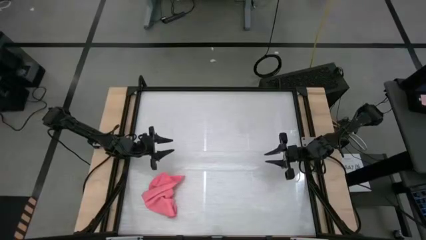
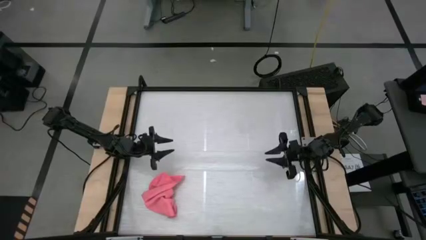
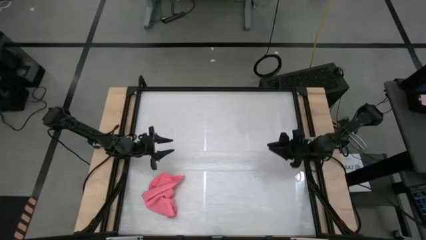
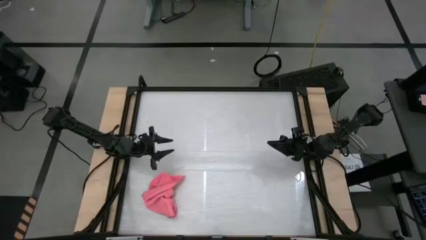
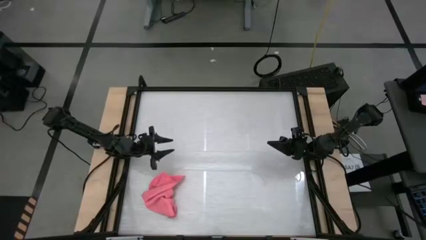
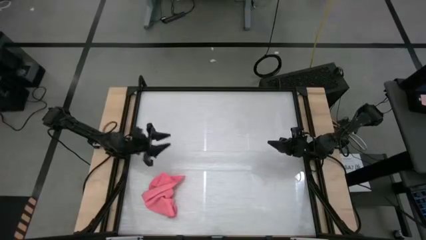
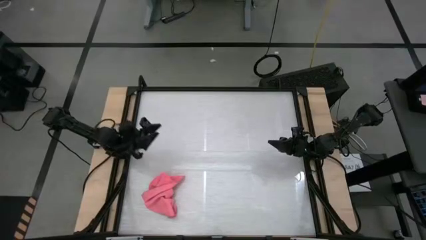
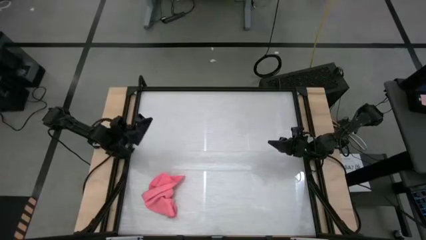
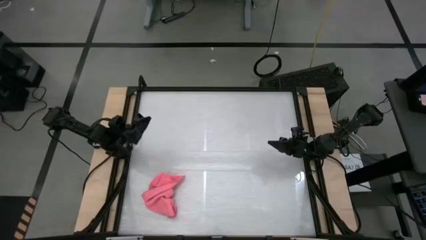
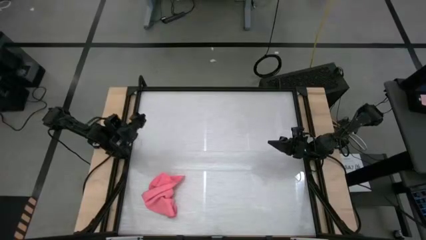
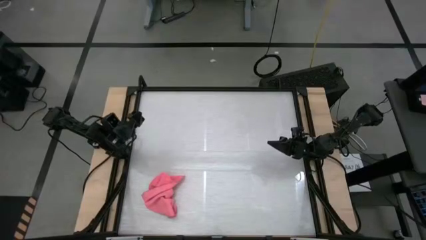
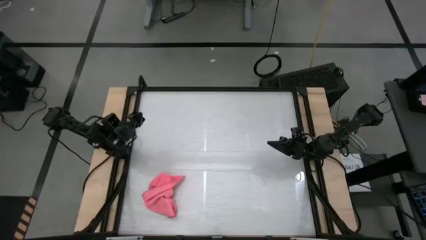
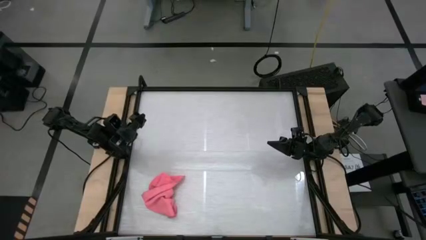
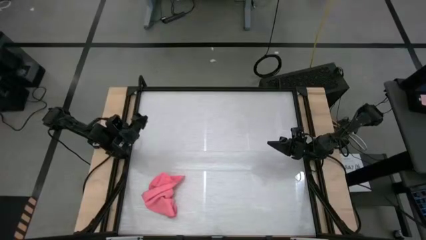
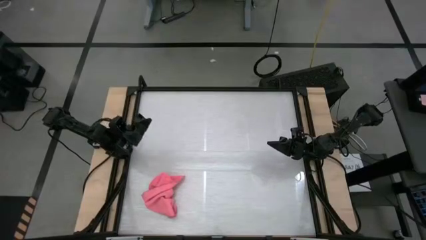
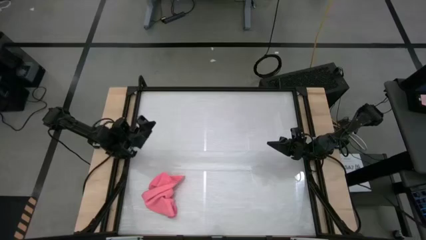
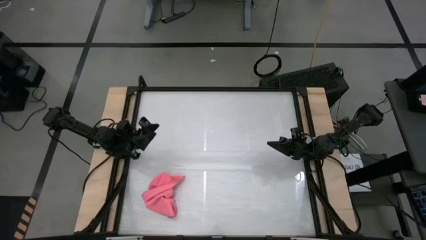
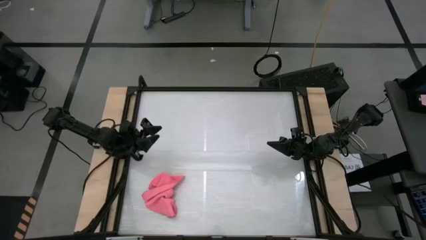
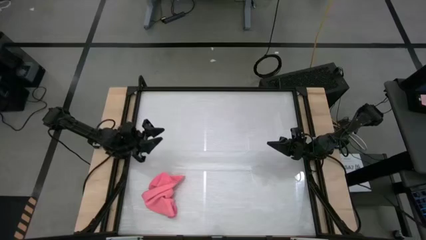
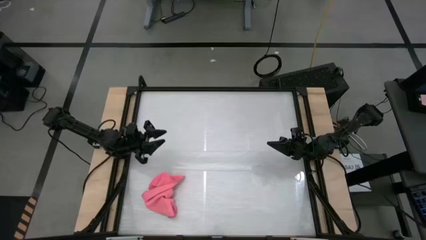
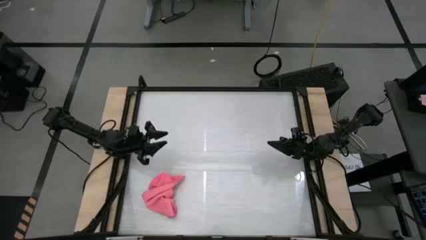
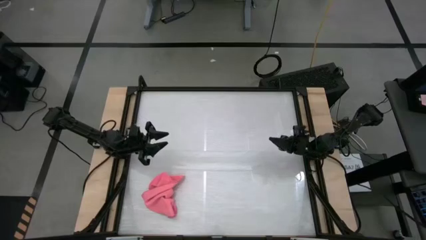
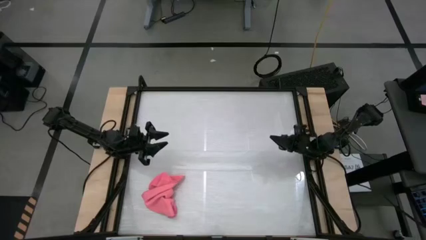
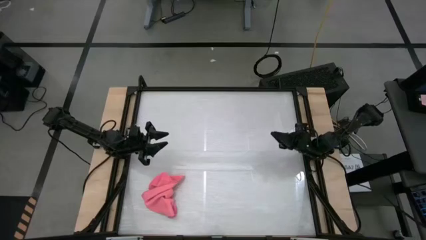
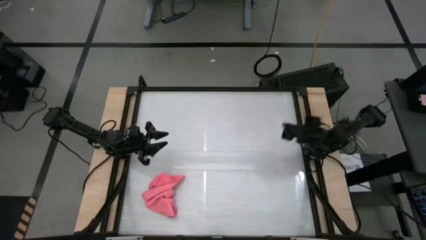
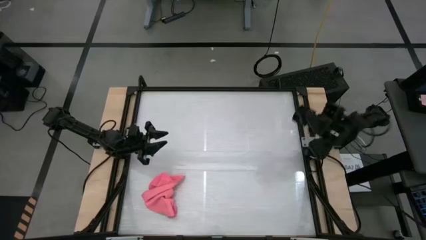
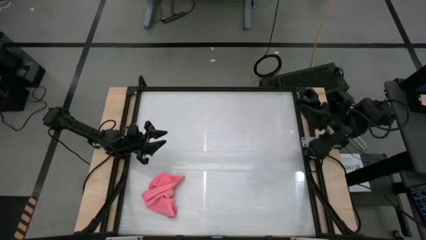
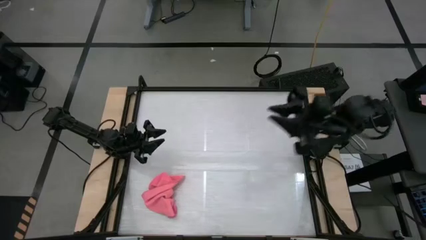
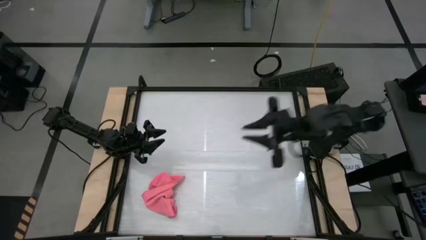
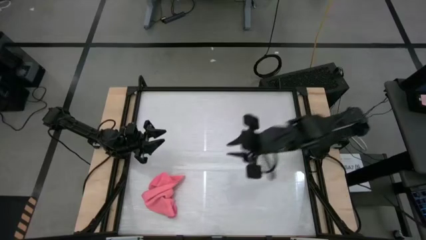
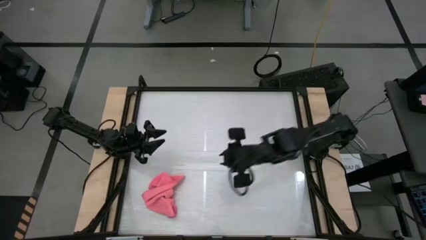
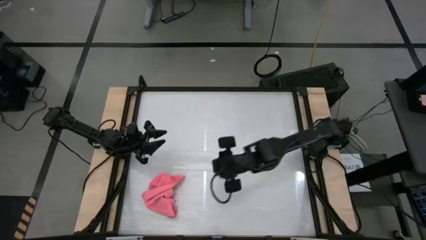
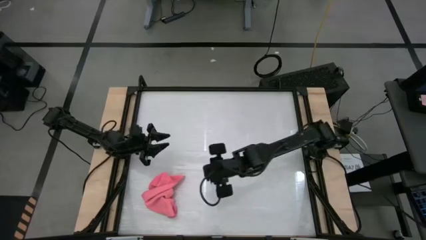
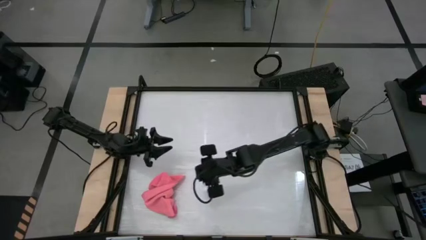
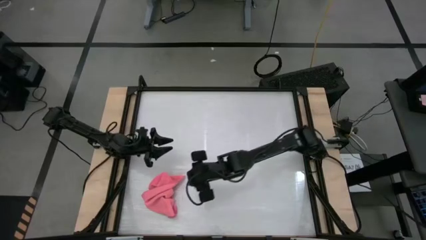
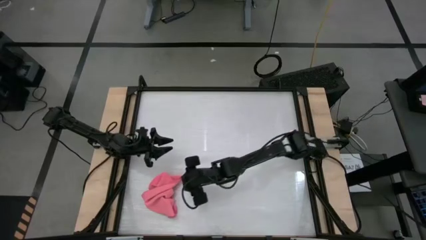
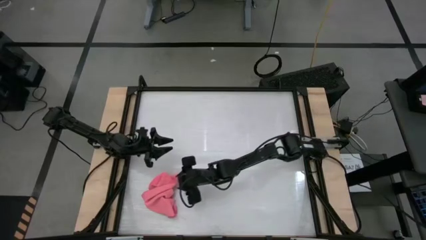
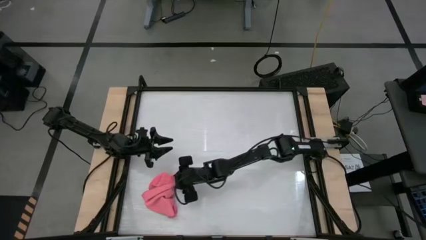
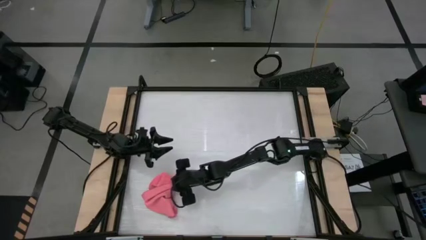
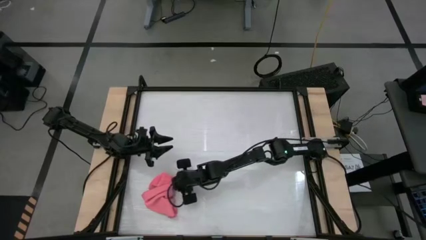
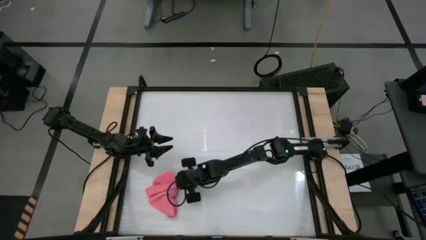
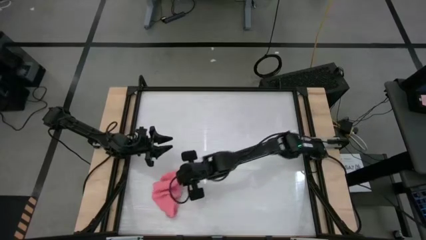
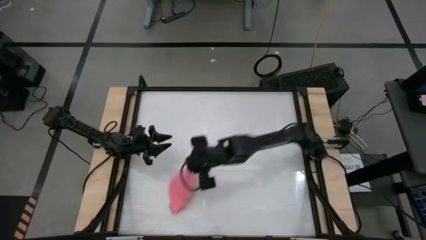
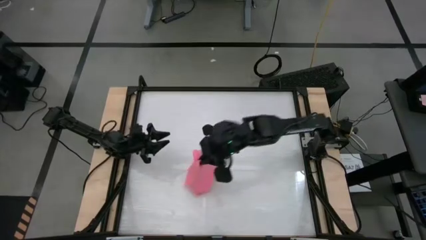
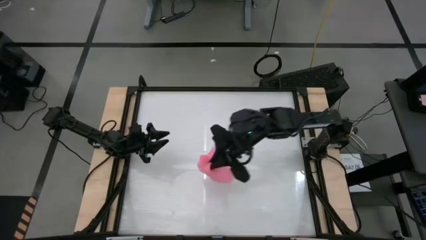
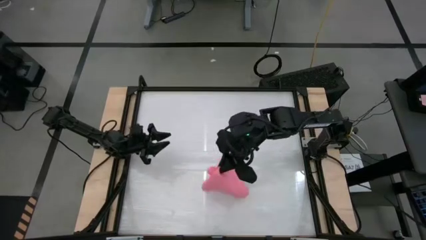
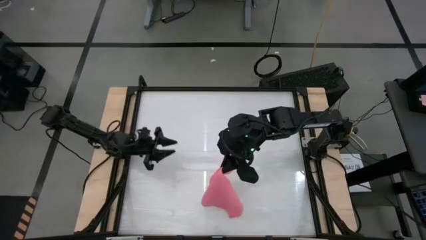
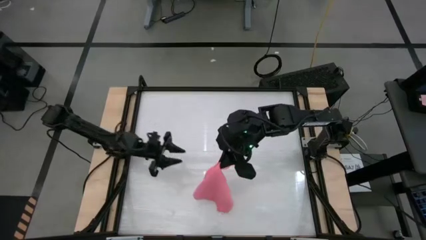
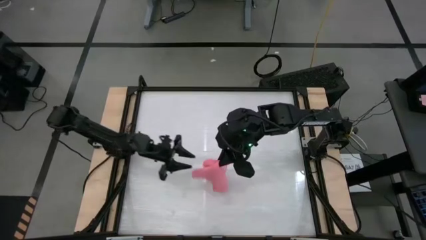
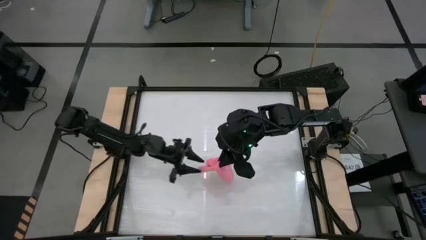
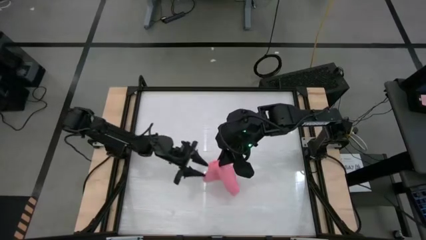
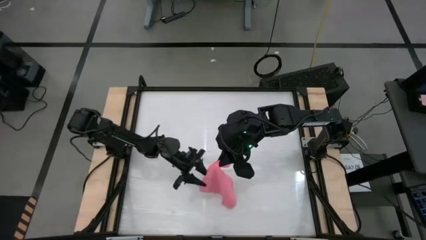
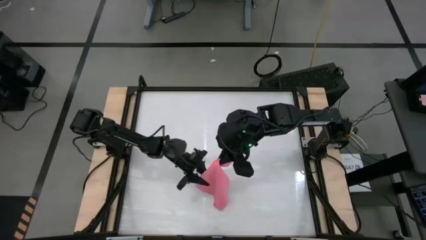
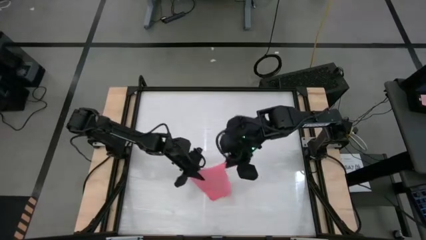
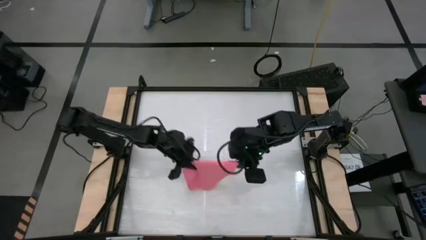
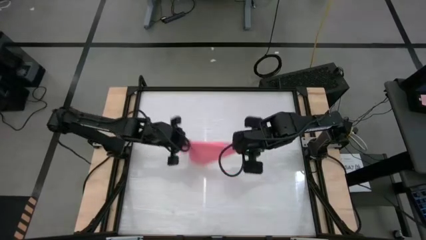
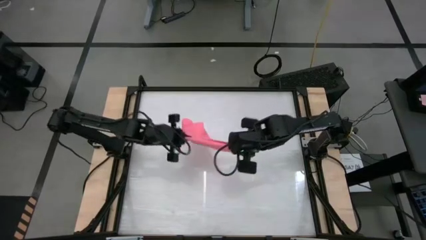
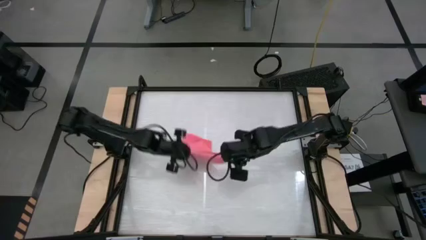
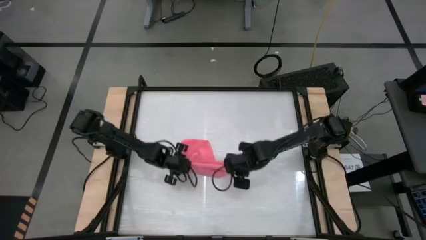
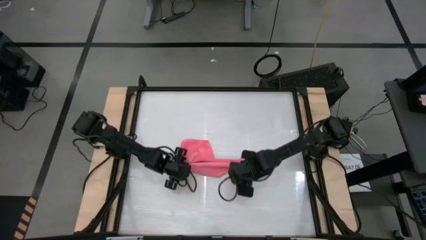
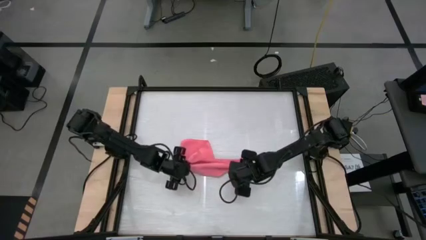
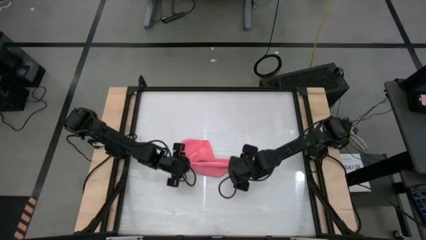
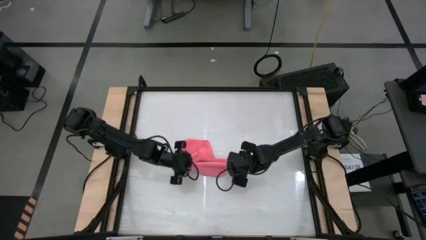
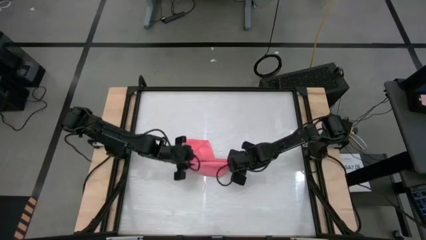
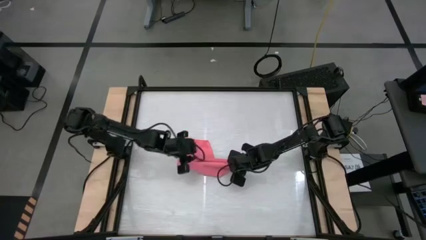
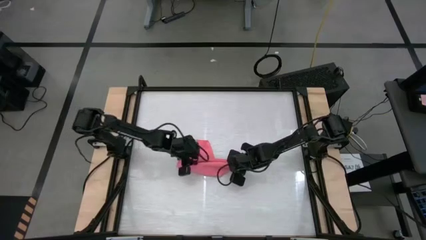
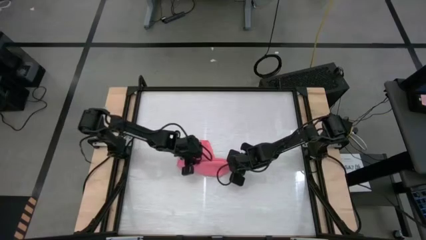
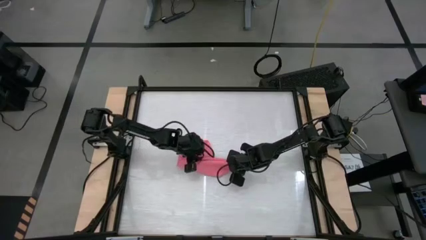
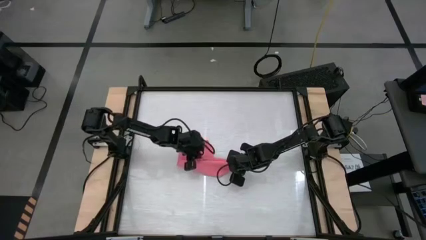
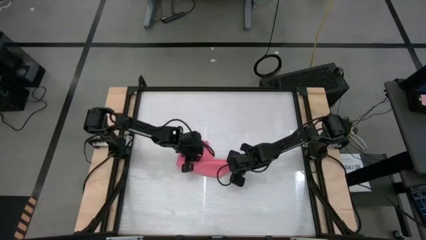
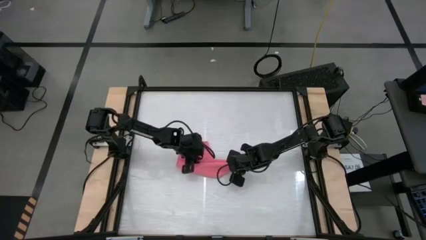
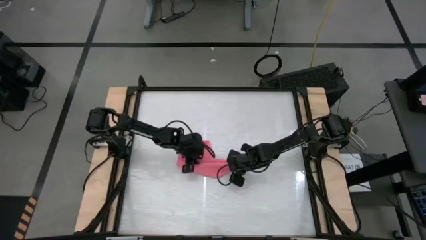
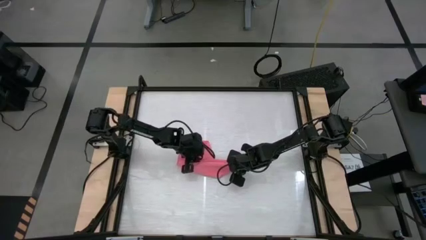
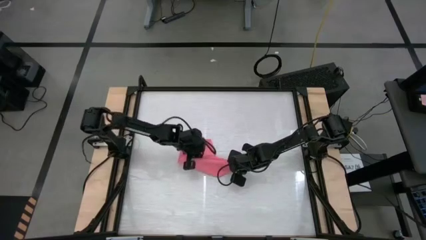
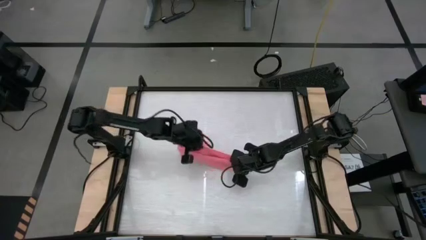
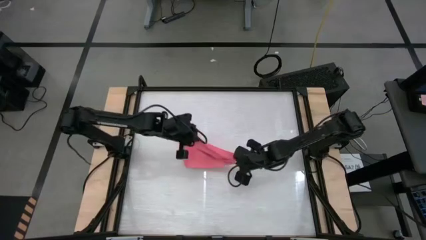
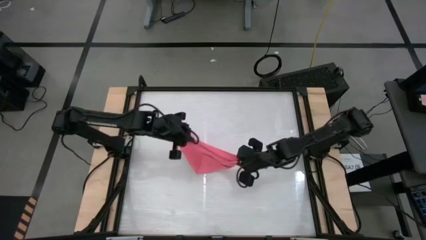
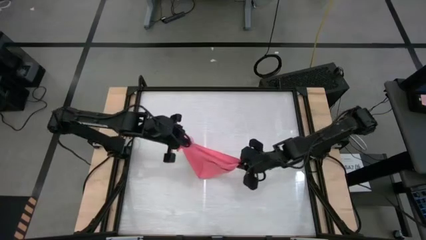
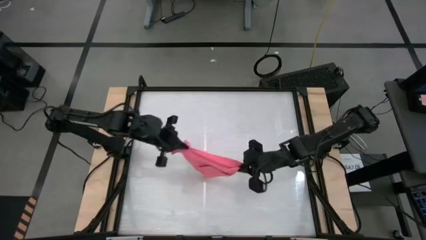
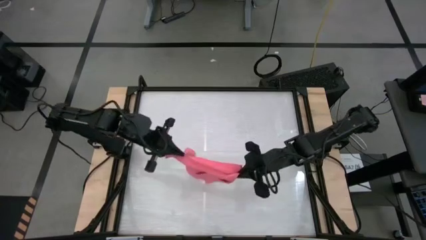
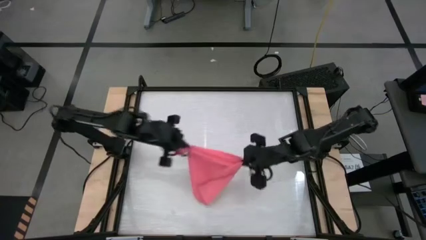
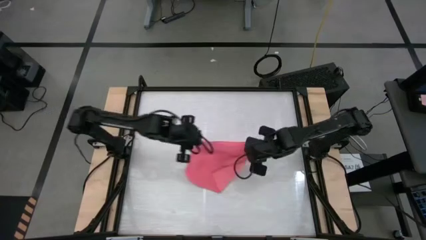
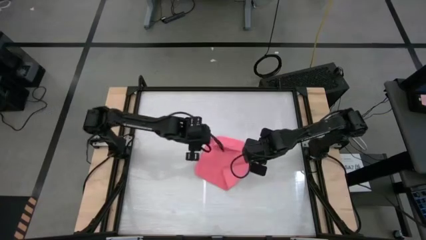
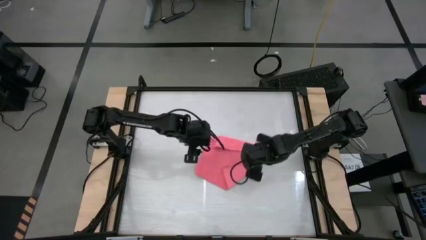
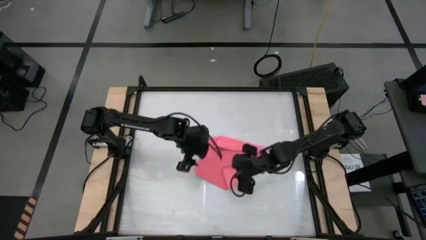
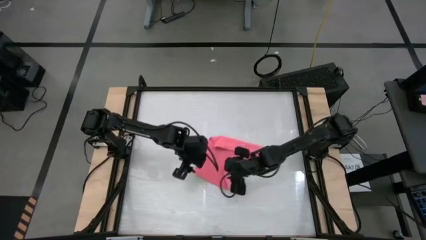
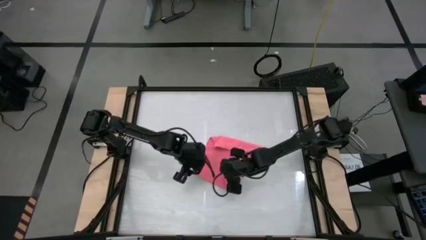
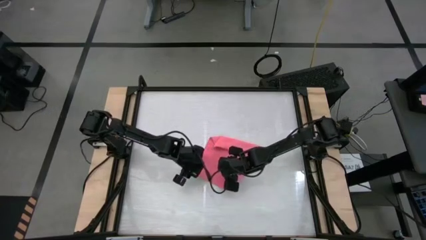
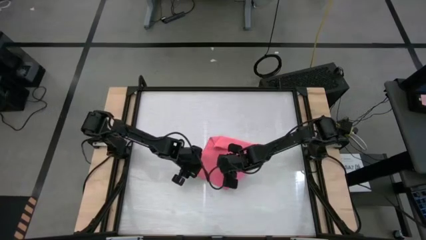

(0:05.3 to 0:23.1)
Task: Roll towel
Roll the pink microfiber cloth
